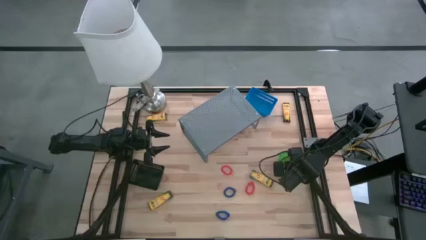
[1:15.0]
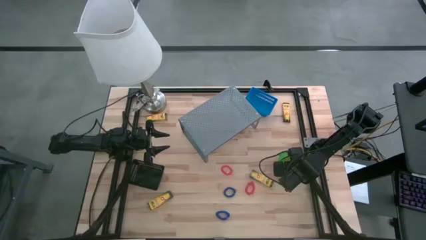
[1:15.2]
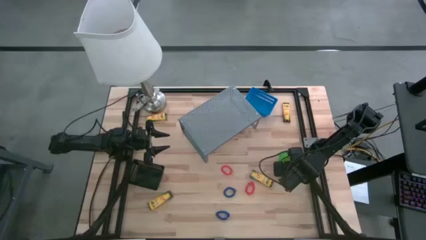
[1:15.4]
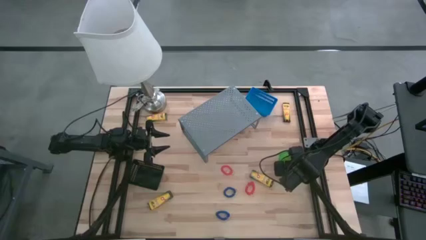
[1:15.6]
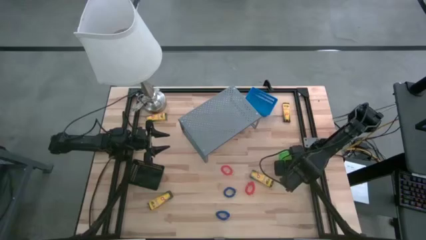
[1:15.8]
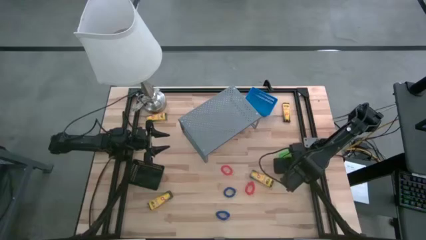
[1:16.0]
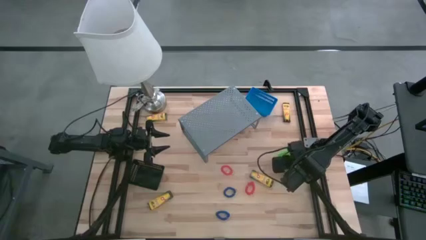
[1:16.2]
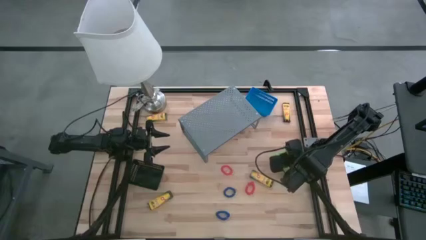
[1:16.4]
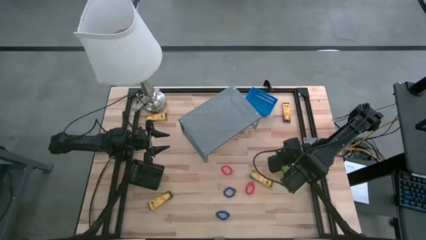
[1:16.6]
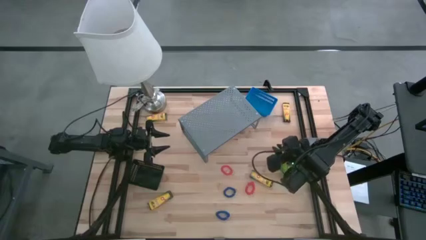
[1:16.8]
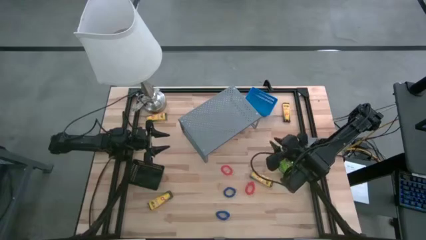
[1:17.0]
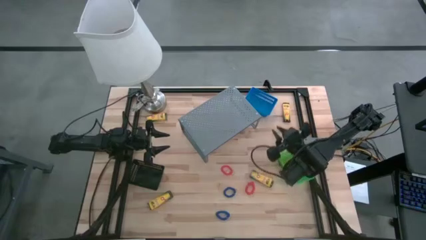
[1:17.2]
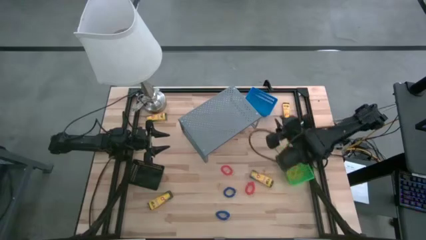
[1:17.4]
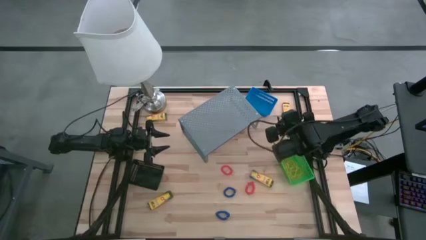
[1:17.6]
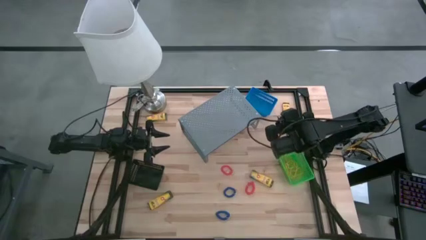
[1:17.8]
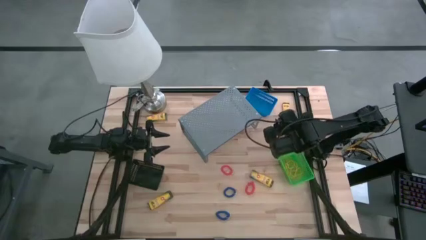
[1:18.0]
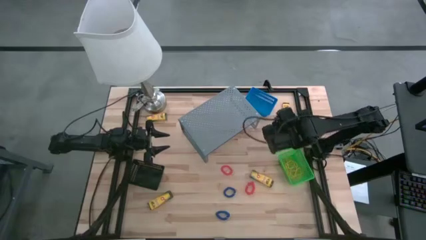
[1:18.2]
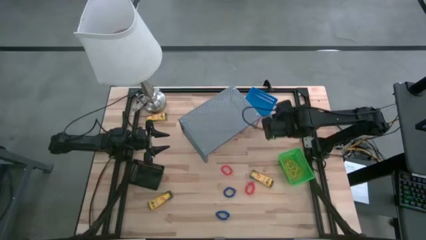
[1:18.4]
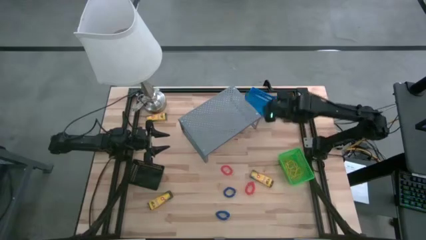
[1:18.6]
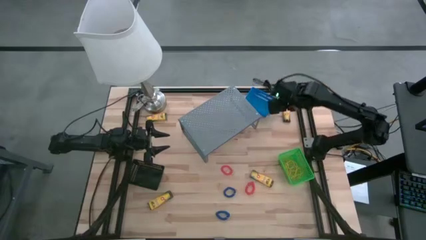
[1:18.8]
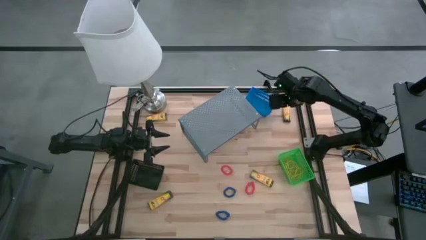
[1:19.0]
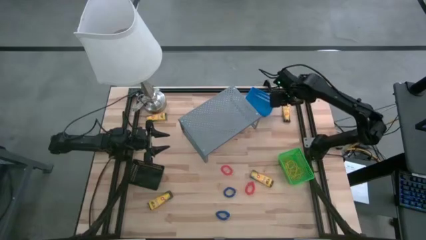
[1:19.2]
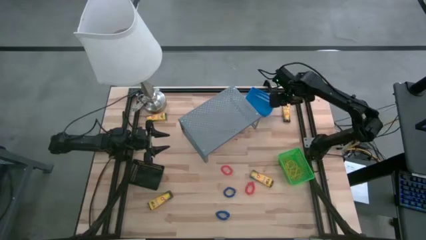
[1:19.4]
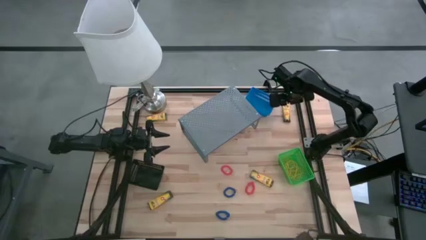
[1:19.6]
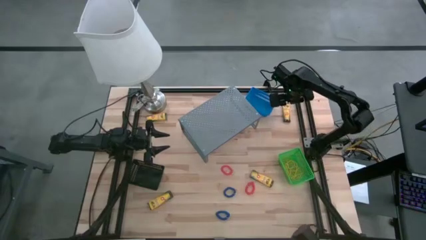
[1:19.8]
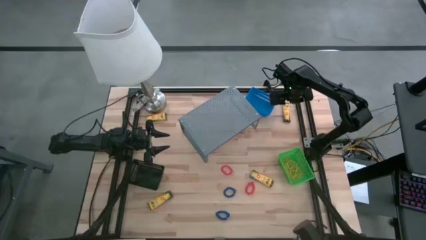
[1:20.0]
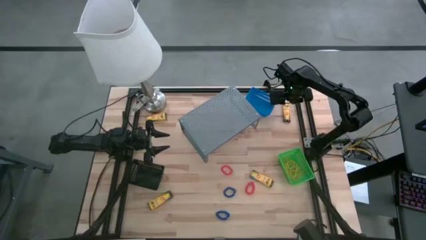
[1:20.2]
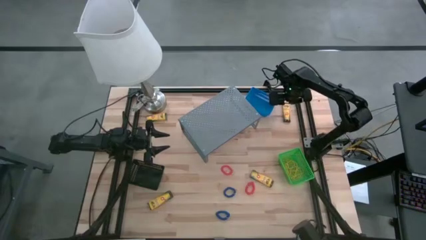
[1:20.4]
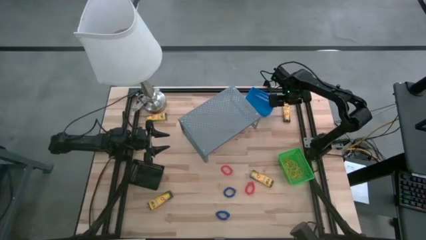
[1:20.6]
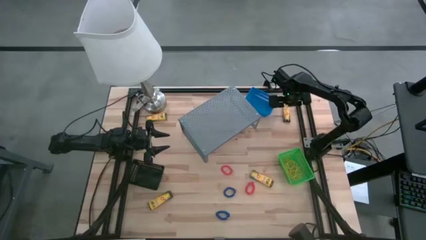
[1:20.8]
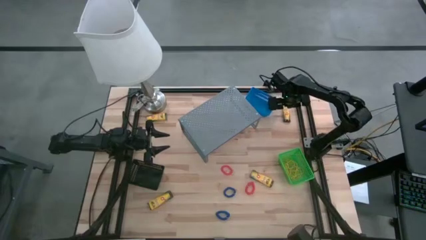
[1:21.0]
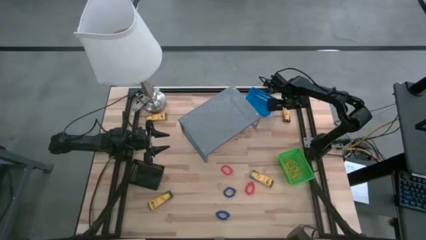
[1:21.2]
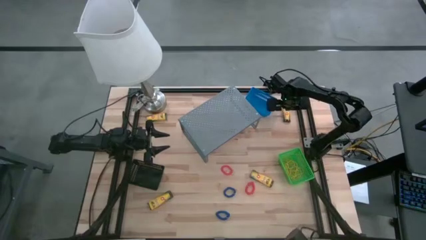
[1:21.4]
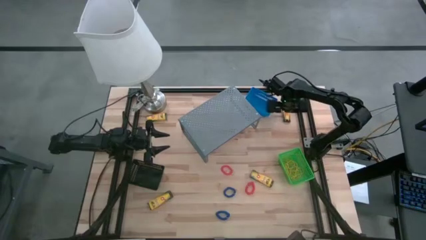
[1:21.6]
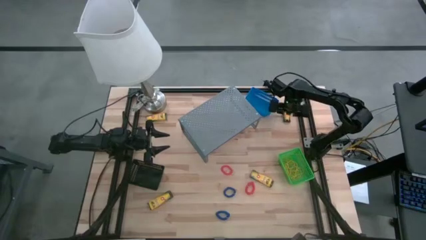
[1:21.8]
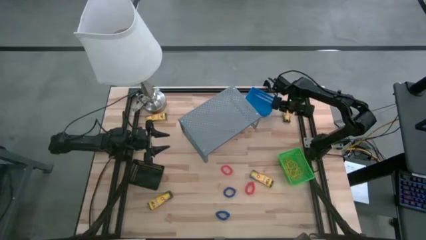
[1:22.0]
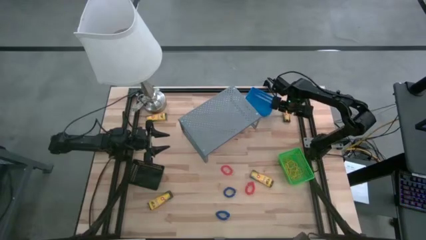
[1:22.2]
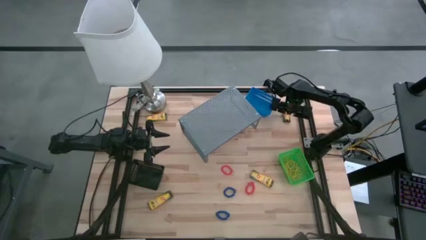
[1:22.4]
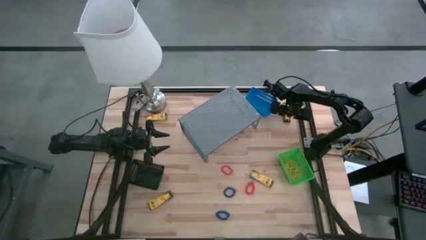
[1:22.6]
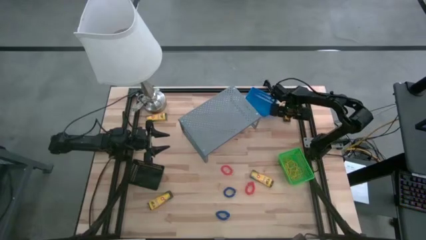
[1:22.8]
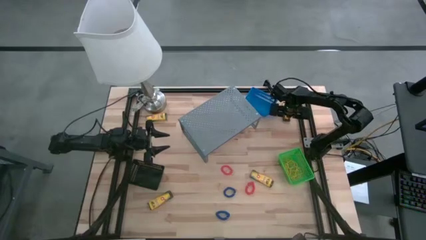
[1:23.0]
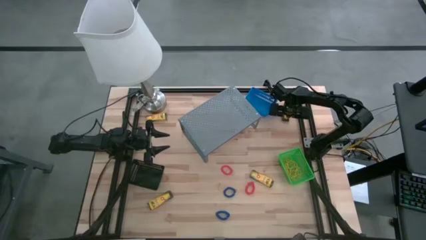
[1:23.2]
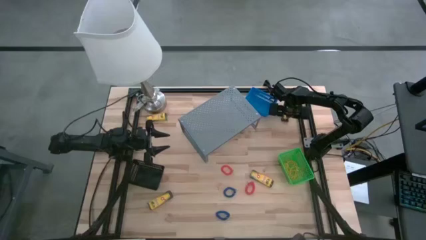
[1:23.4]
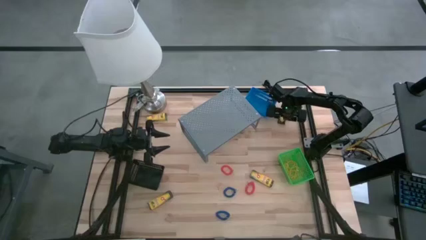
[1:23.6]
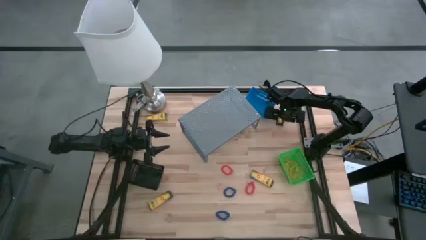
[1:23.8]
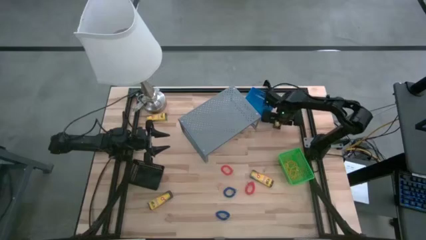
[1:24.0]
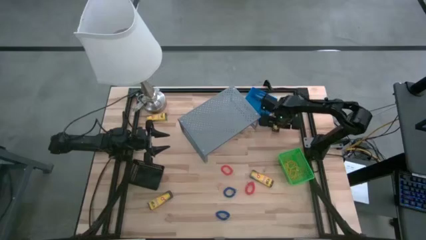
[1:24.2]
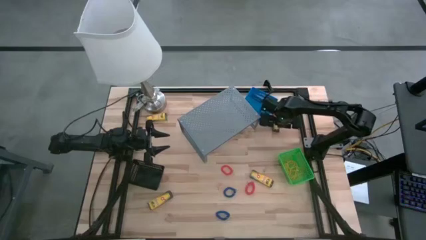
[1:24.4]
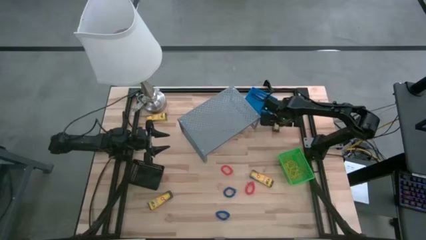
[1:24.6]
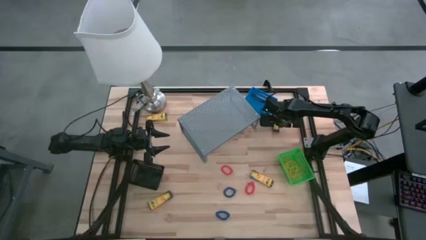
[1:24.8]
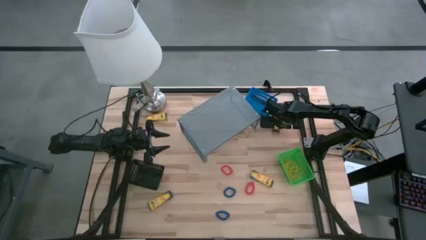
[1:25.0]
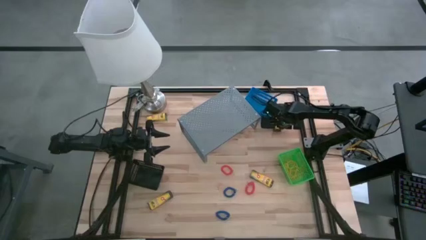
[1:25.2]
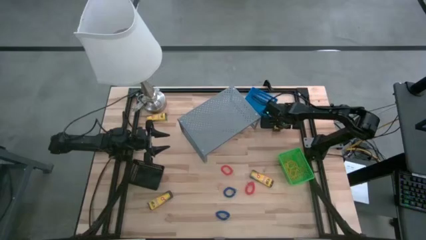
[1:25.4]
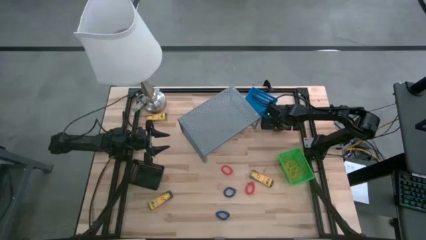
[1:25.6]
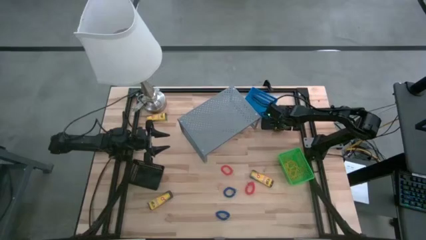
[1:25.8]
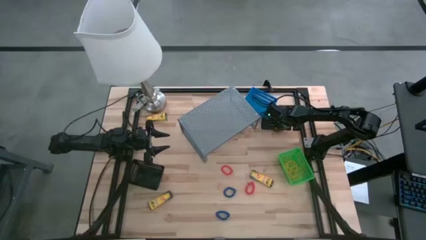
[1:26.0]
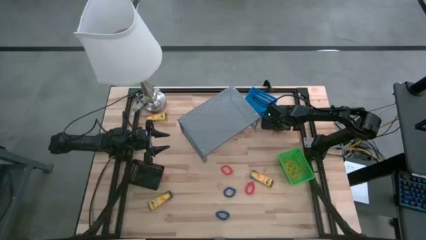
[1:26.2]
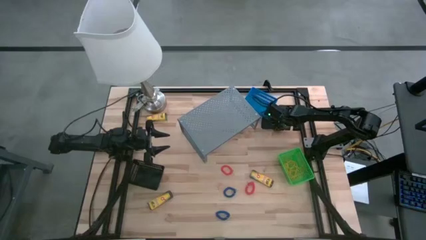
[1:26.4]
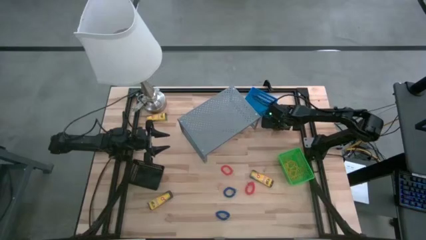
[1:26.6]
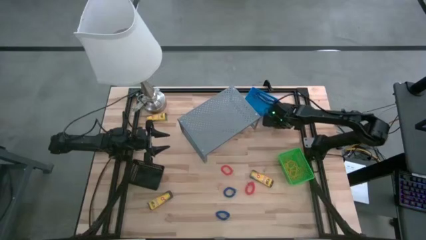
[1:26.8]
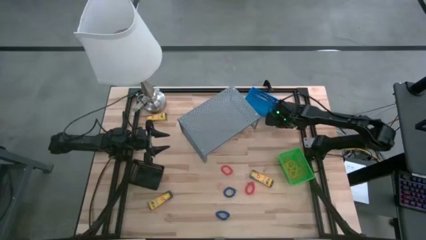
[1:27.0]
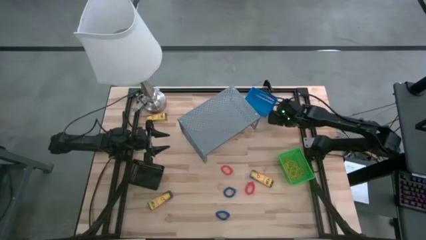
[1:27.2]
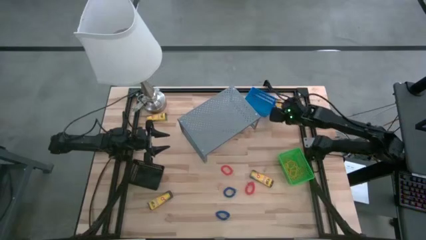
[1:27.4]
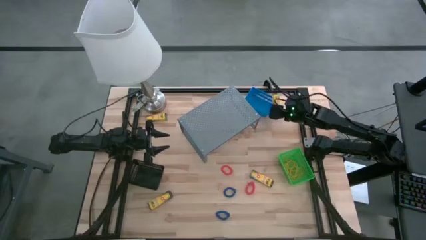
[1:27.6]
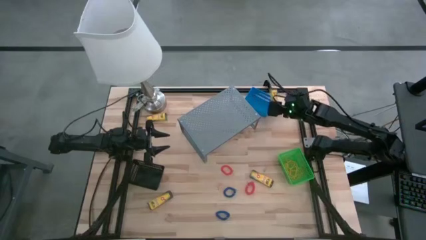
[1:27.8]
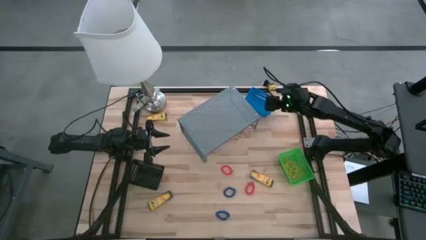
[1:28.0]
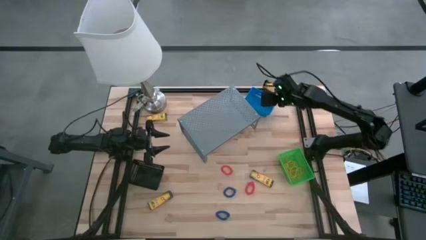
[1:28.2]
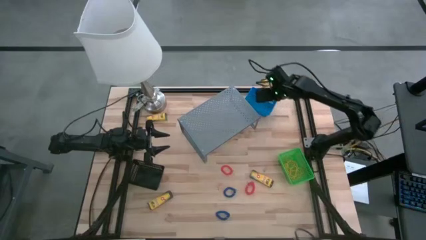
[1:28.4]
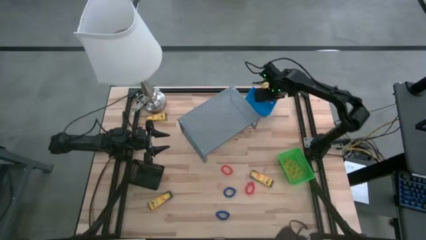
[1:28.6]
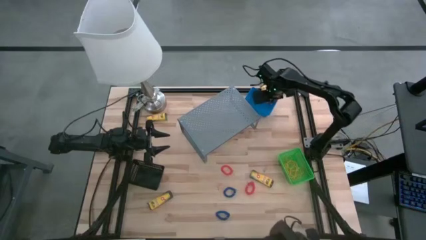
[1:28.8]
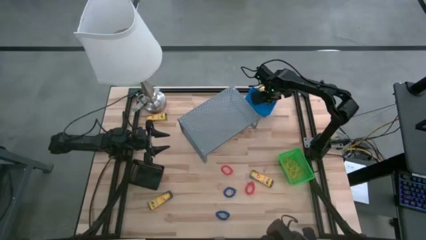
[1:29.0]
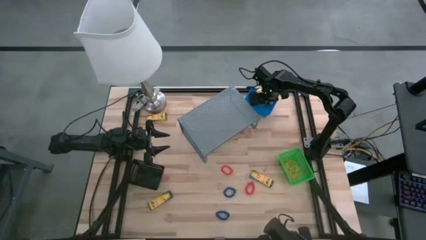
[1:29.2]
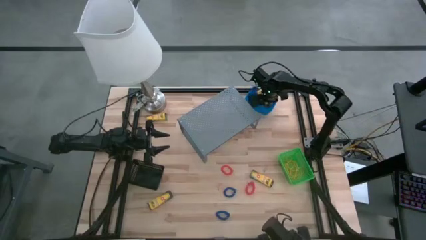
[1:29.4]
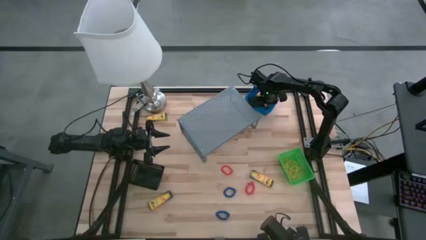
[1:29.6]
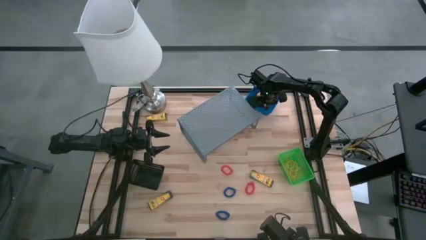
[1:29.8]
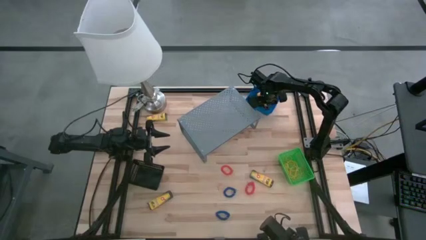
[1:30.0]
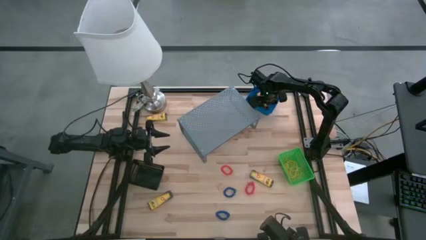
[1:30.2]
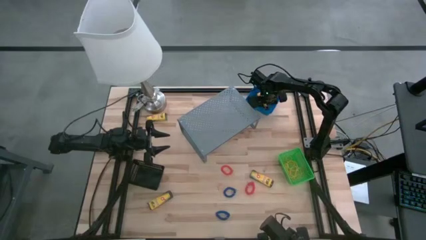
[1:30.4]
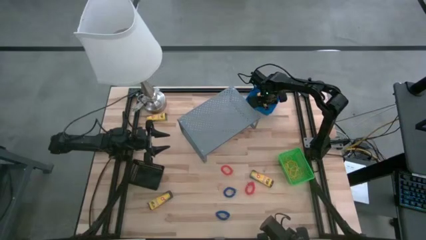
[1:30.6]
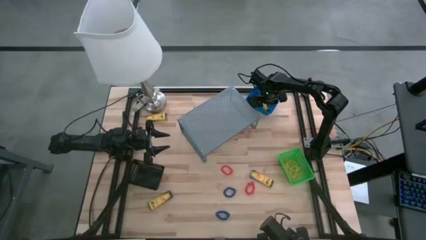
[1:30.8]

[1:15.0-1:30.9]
Task: Pick & Place Office Desk Supplies
Put the crayon box into the blue basket
